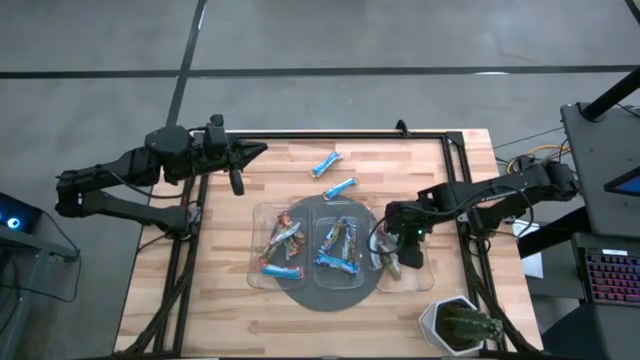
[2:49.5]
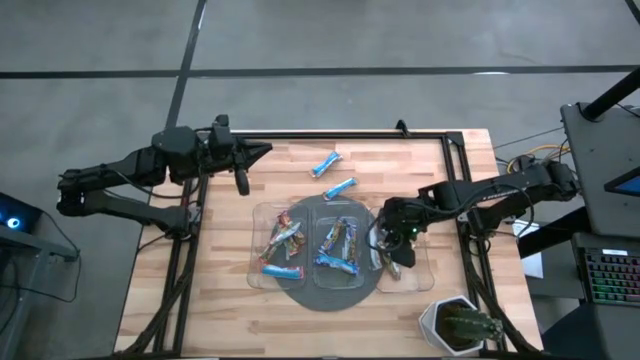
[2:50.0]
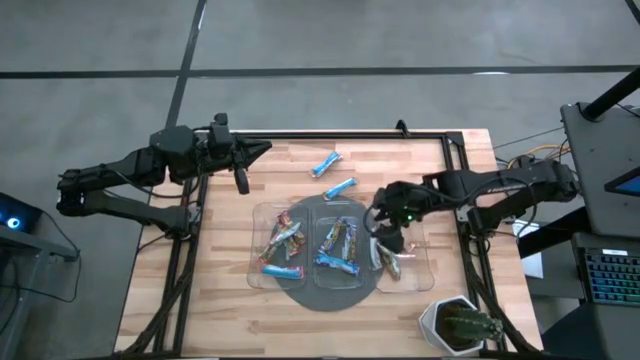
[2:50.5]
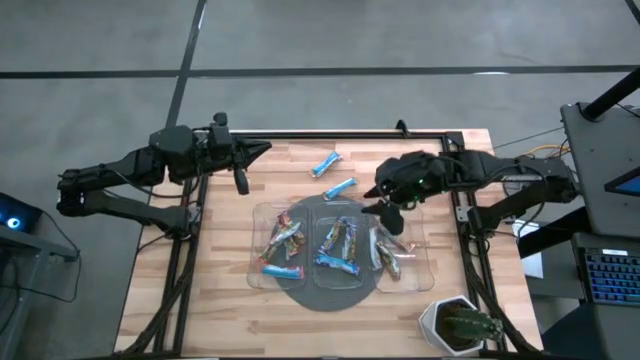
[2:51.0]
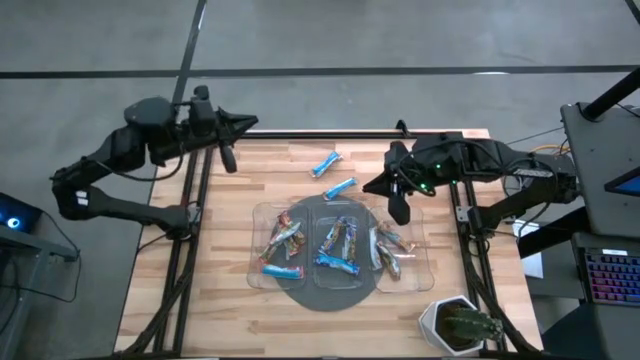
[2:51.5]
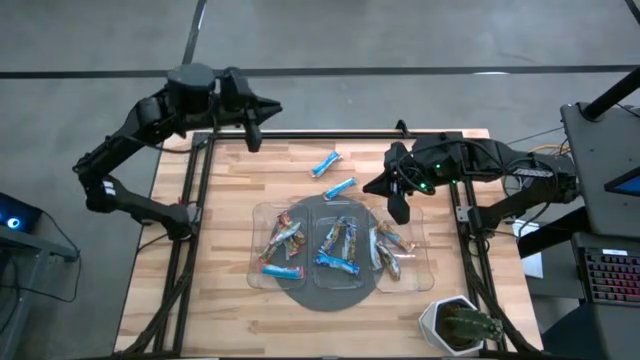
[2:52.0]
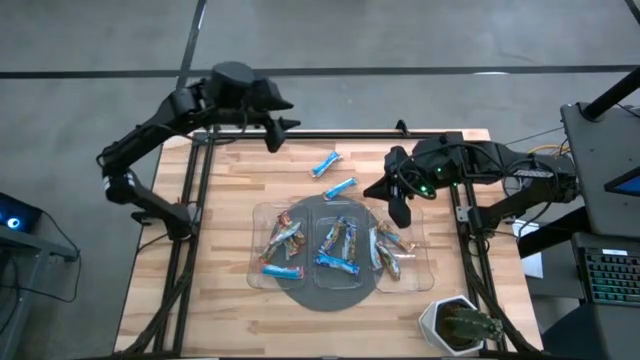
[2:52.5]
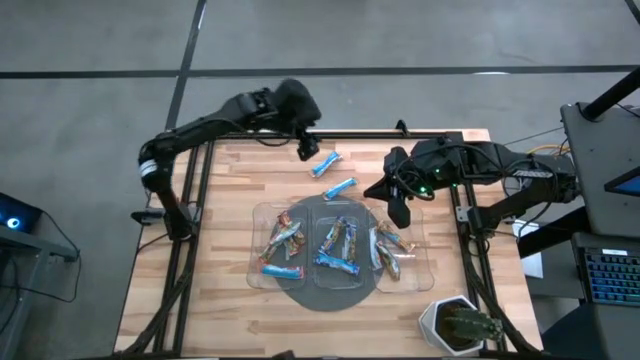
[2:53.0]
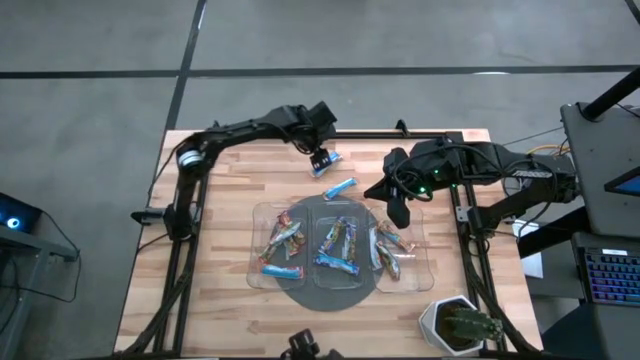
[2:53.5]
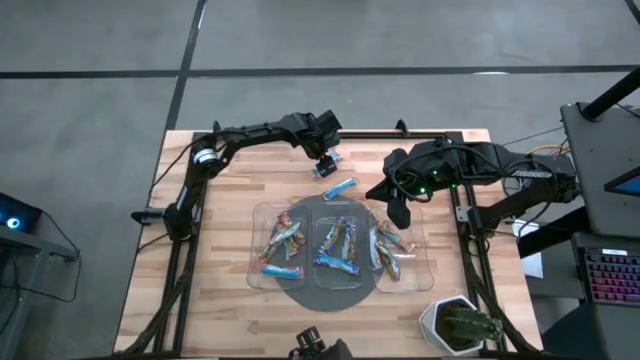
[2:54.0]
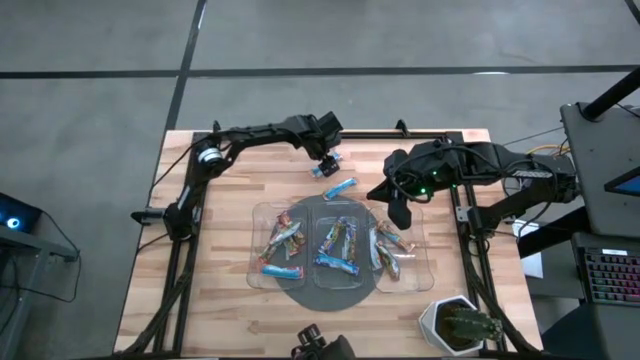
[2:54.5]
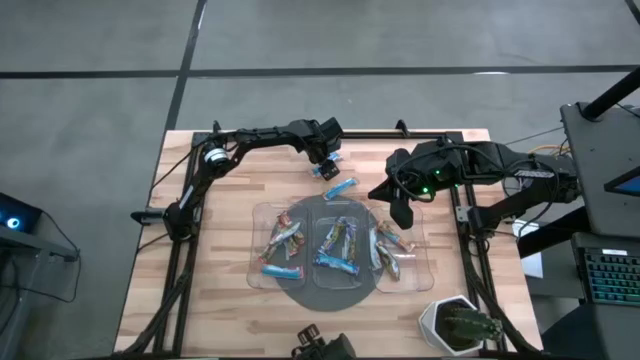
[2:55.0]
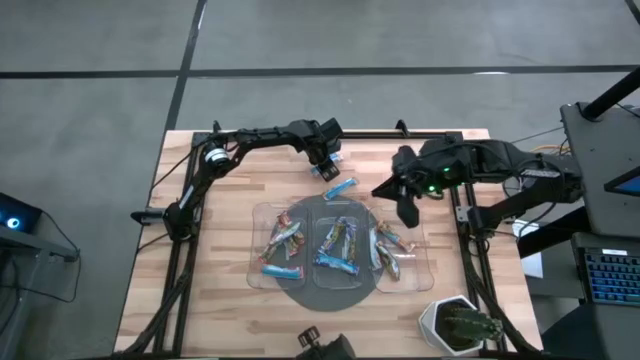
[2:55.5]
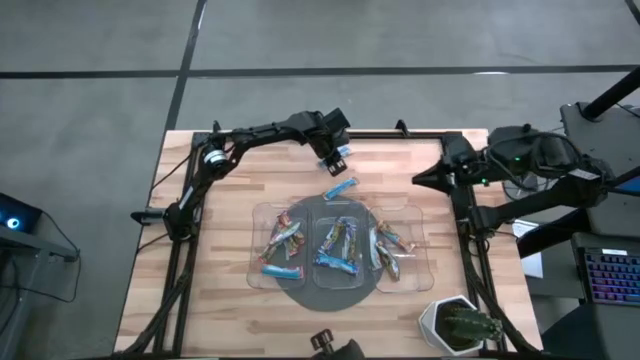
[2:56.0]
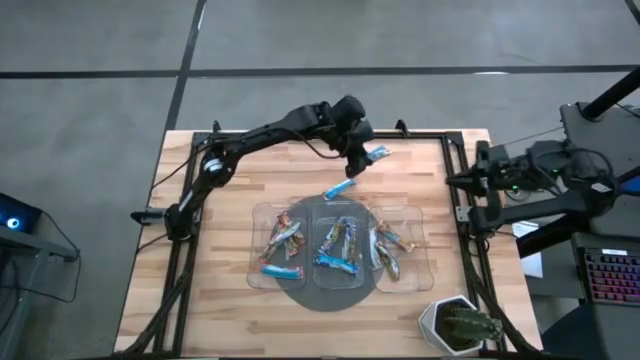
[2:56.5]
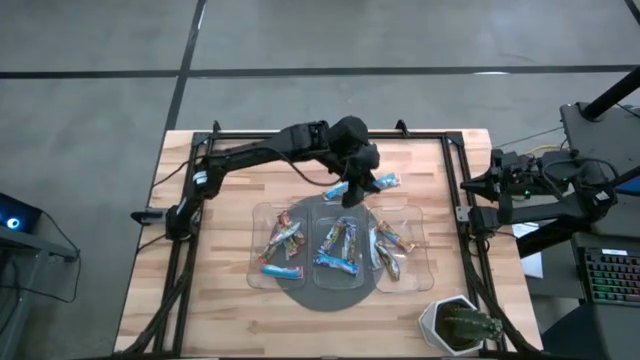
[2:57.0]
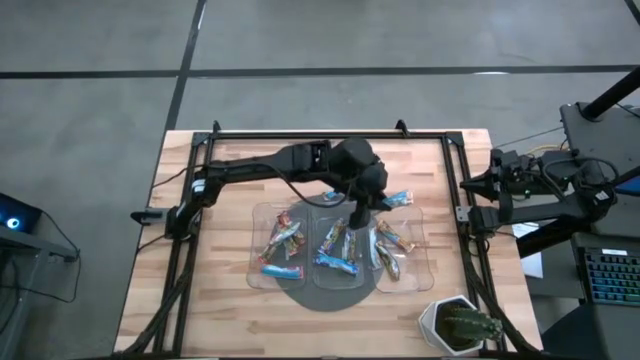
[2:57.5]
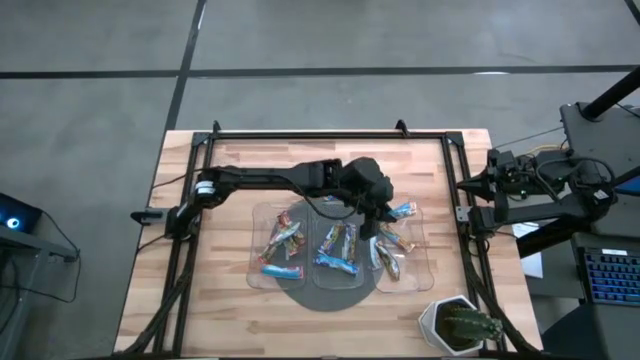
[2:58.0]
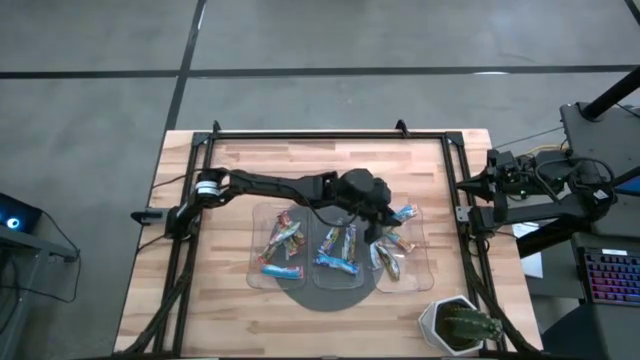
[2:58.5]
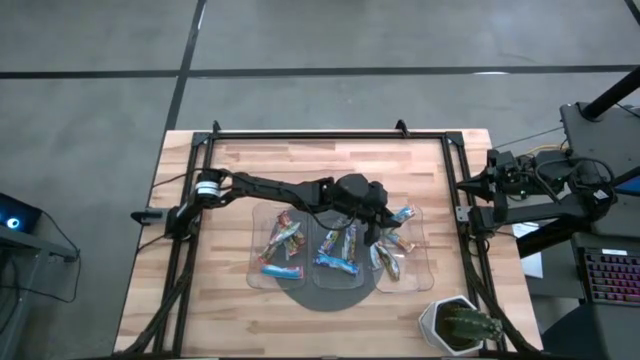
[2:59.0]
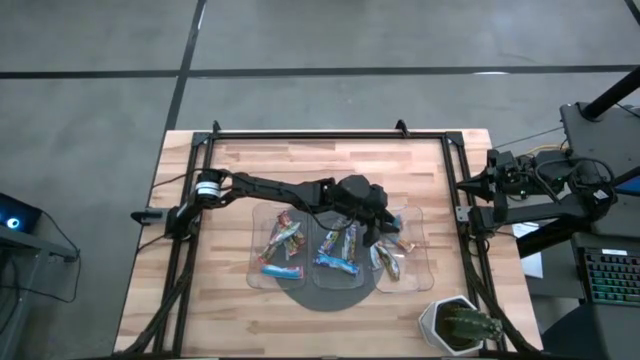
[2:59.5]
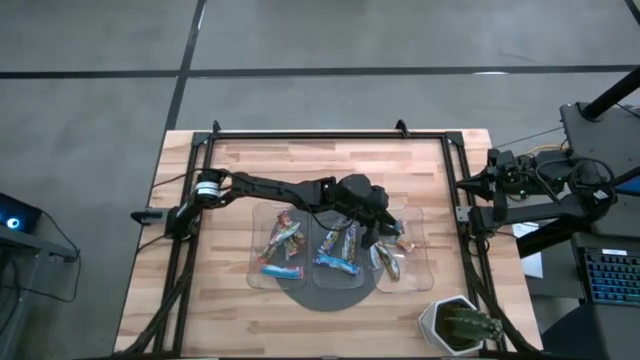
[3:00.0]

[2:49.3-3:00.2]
Task: Pick and place Granola Bars by type
Put the yellow granola bar into the right transparent bin

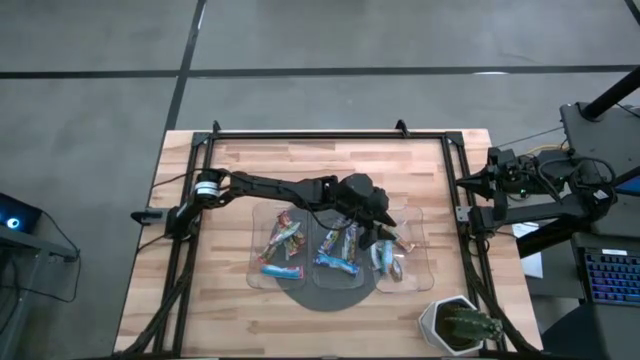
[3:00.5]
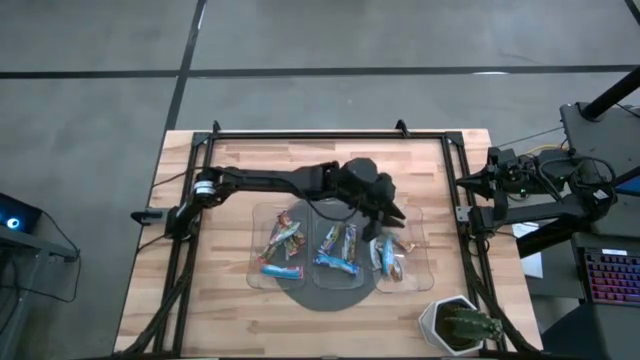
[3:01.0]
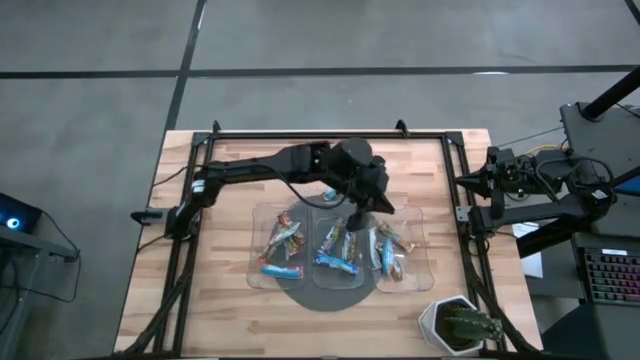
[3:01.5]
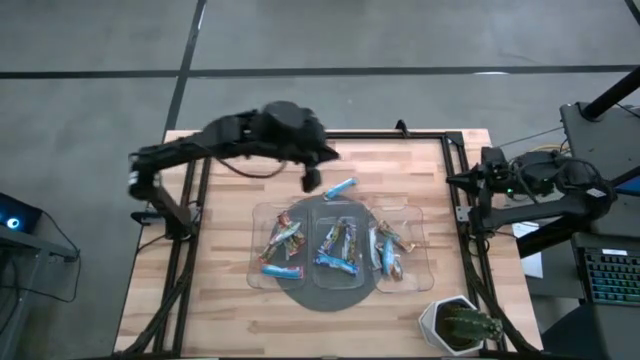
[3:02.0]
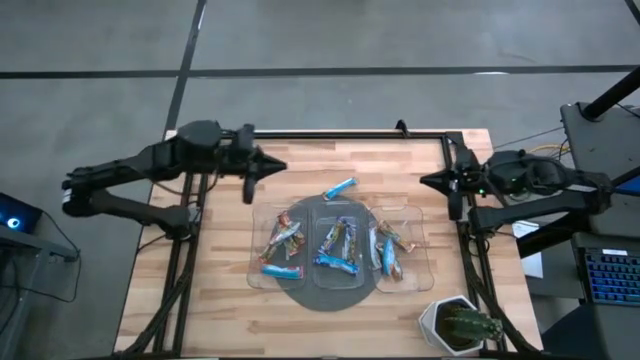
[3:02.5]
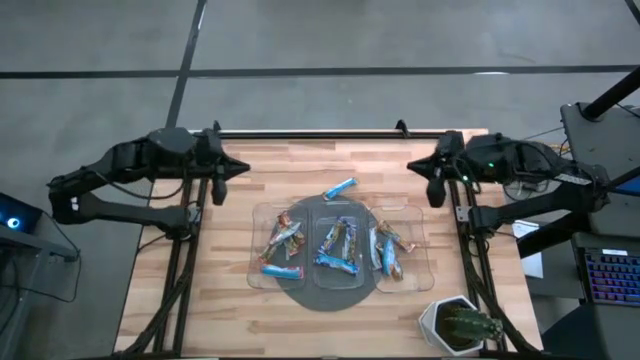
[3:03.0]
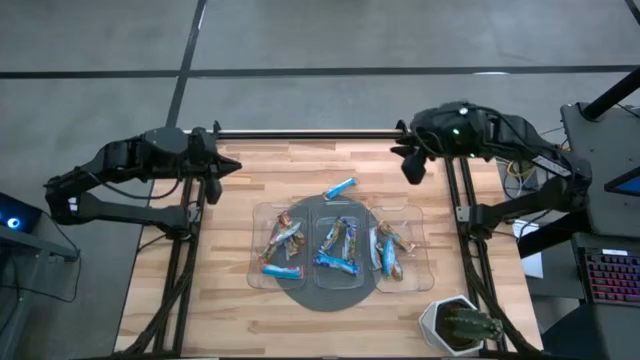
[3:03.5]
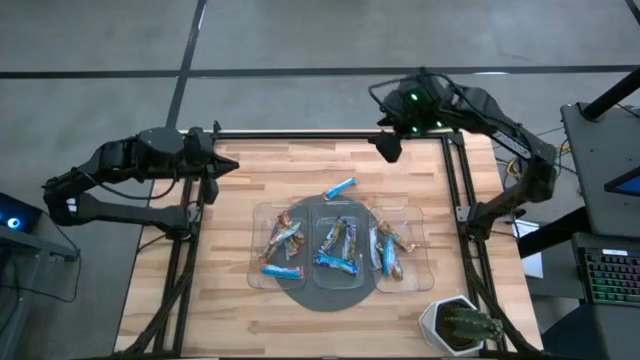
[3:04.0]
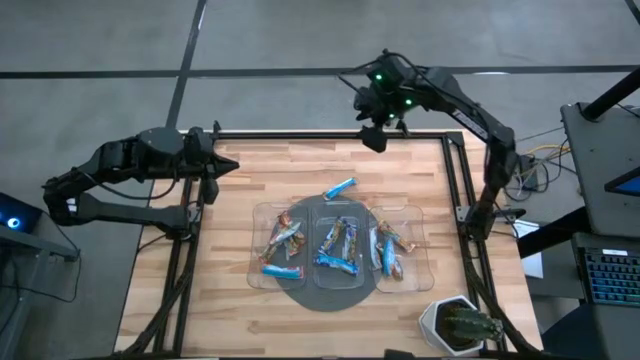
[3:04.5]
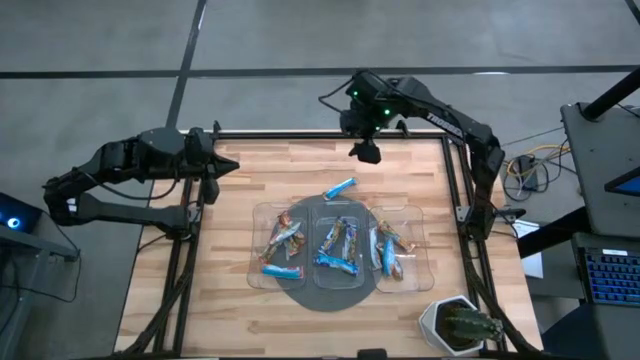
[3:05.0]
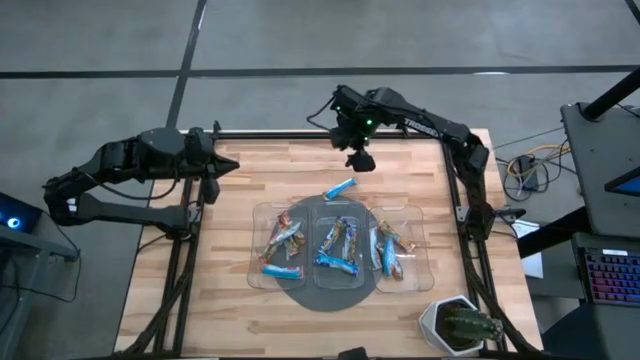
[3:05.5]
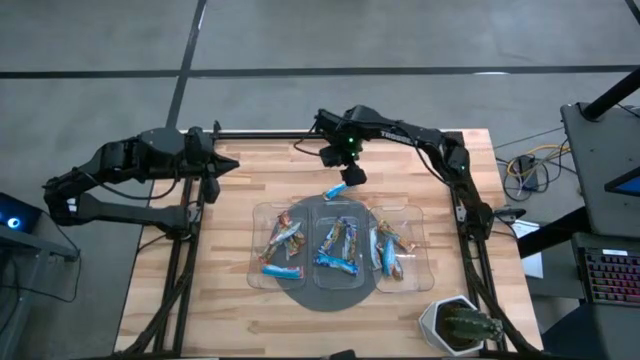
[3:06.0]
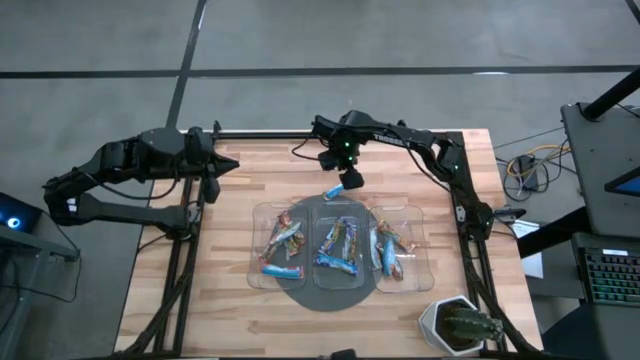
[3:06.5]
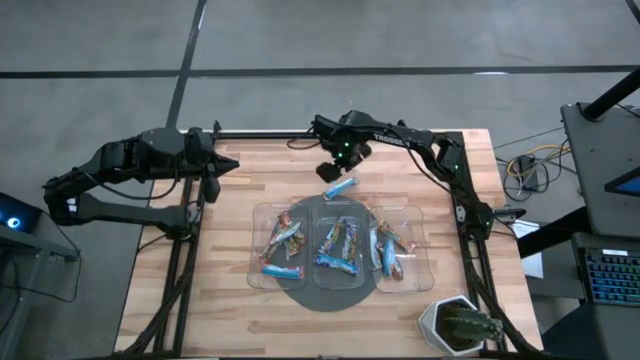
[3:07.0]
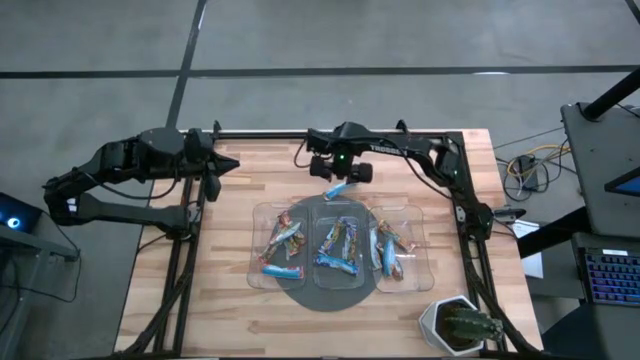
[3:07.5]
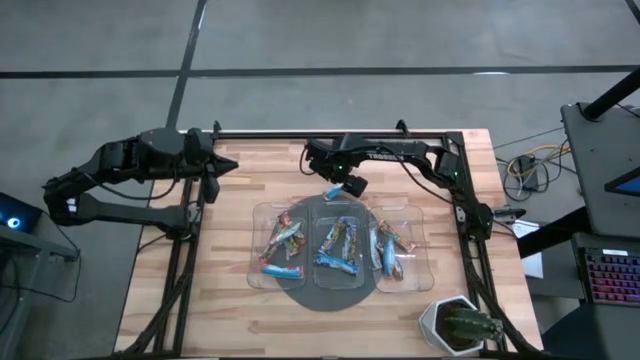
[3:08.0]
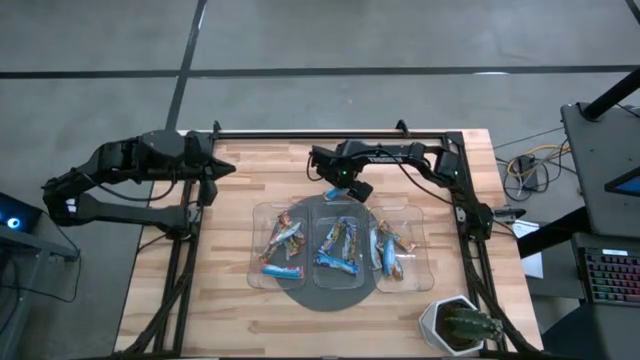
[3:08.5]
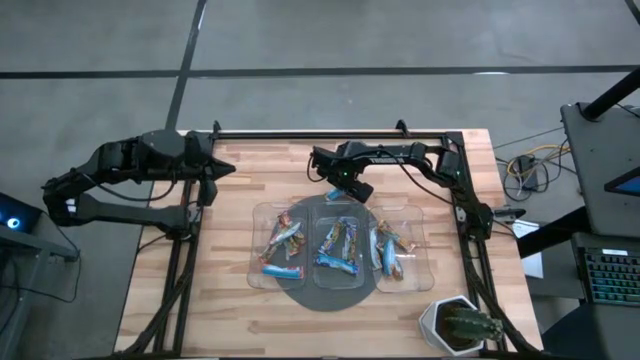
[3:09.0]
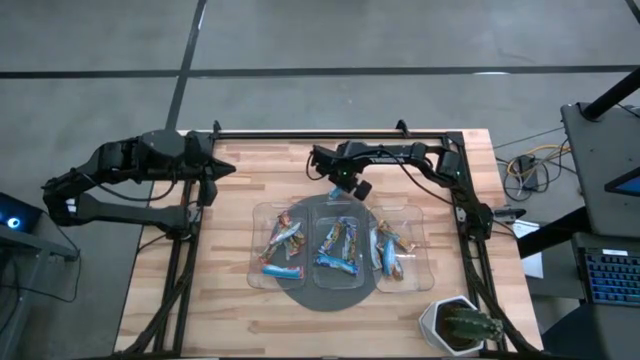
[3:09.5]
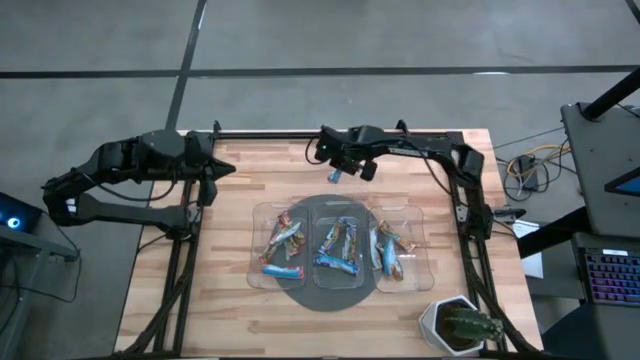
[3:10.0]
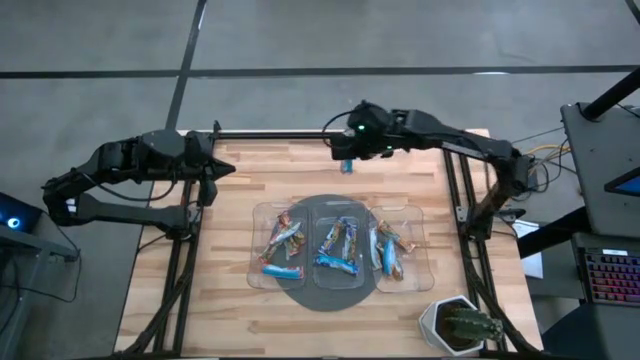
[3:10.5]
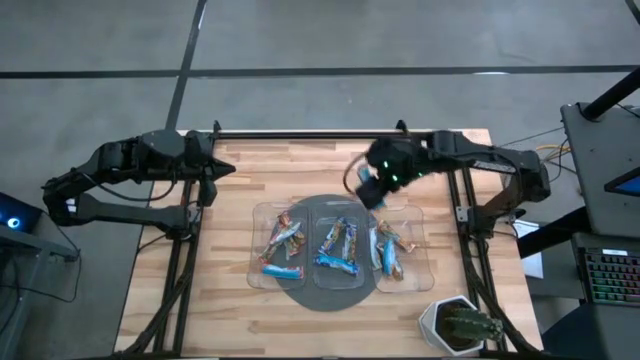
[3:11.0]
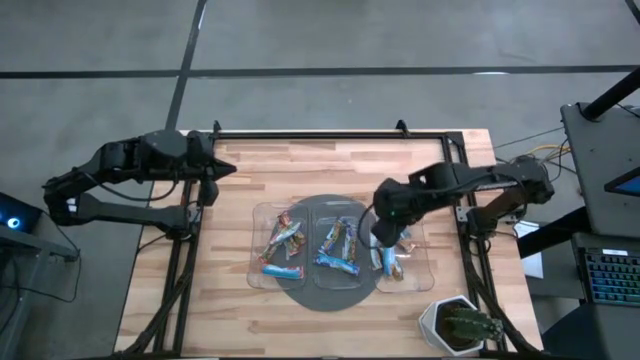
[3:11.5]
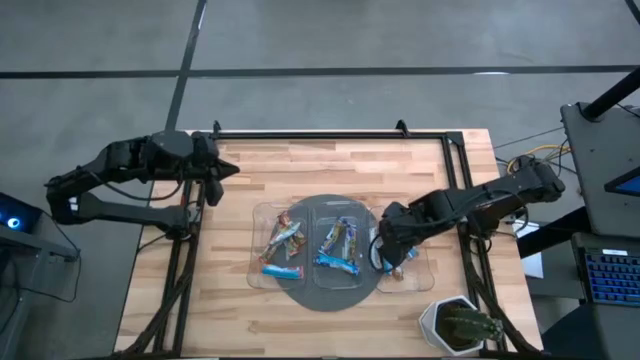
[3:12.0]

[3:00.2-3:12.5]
Put the yellow granola bar into the right transparent bin
